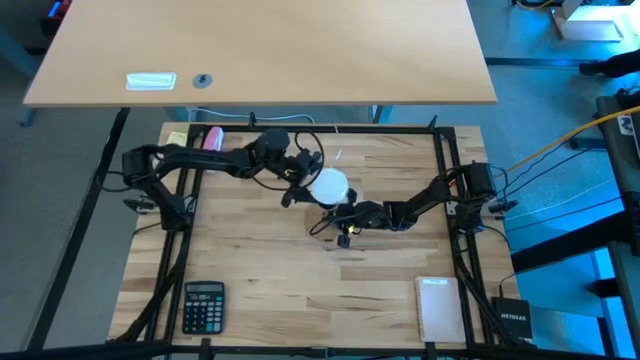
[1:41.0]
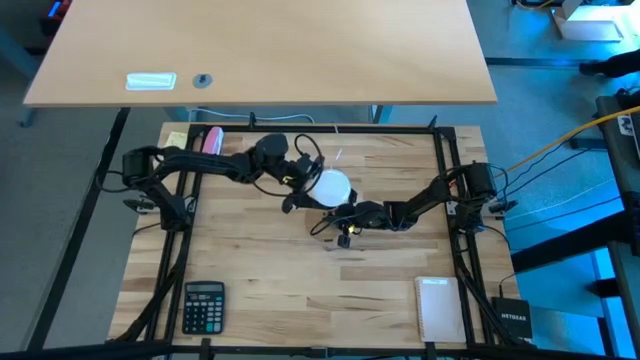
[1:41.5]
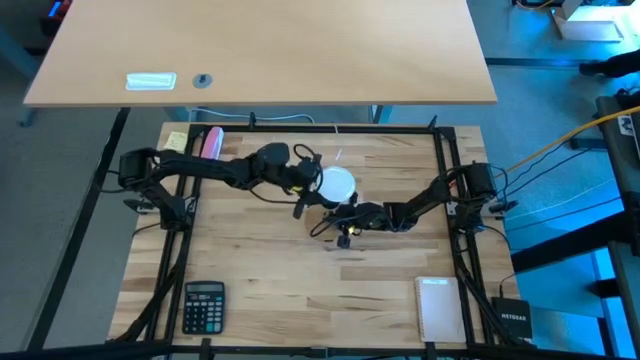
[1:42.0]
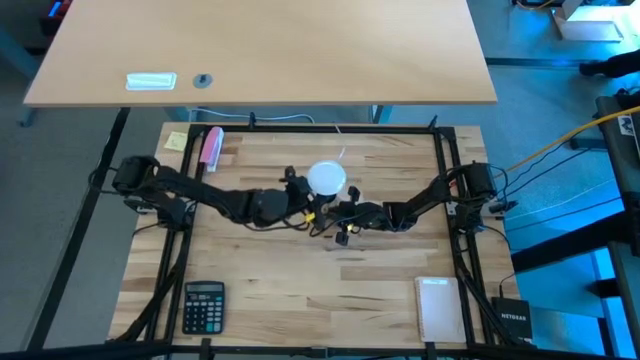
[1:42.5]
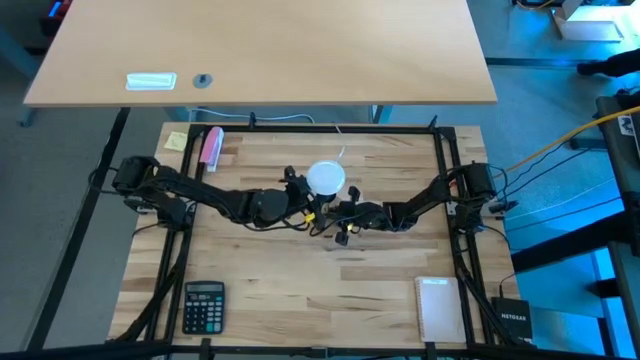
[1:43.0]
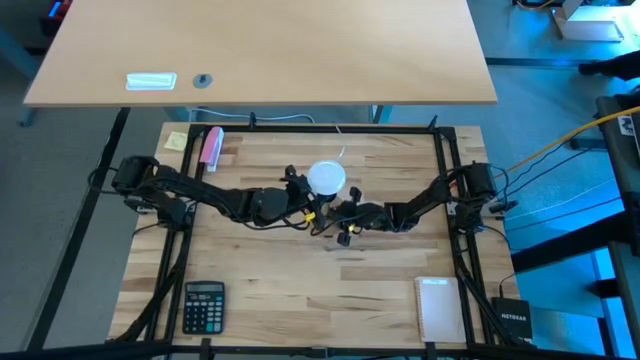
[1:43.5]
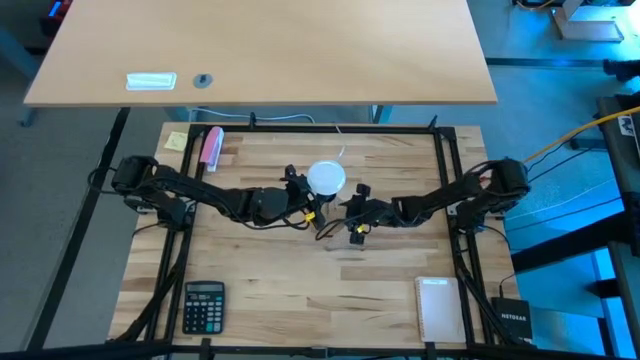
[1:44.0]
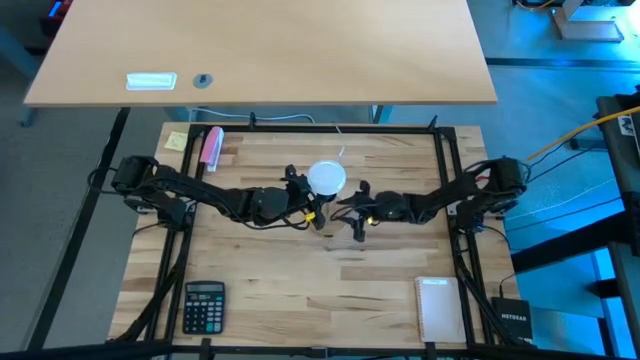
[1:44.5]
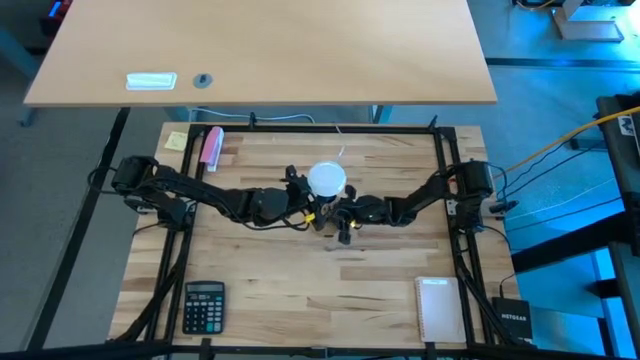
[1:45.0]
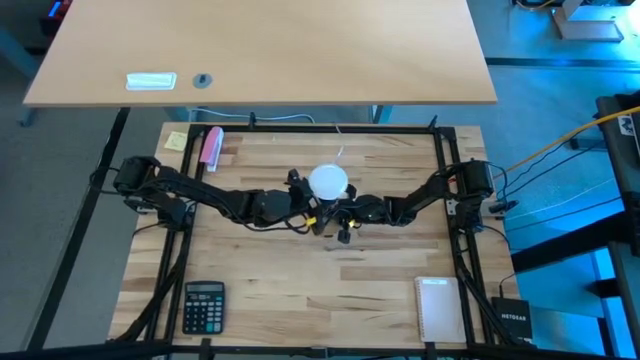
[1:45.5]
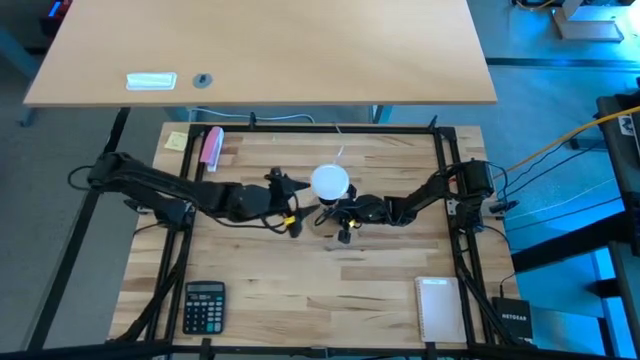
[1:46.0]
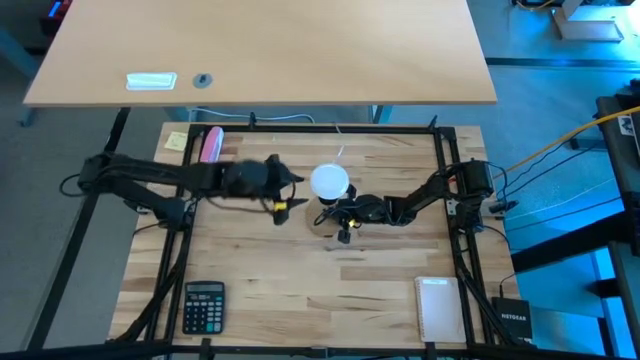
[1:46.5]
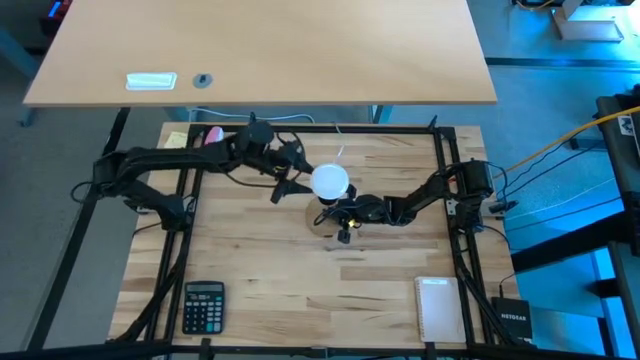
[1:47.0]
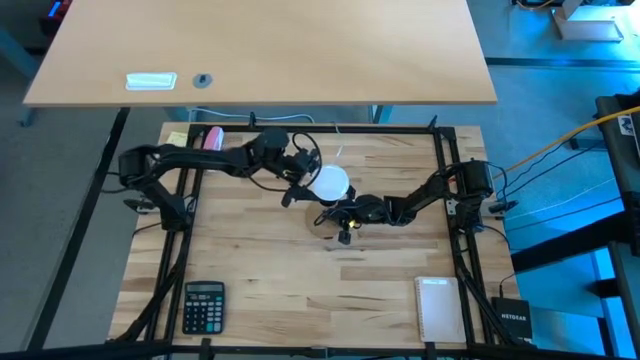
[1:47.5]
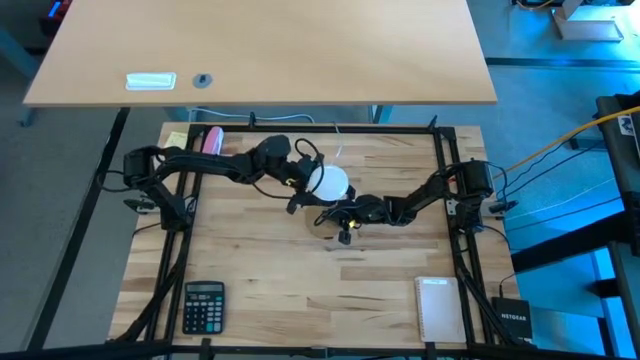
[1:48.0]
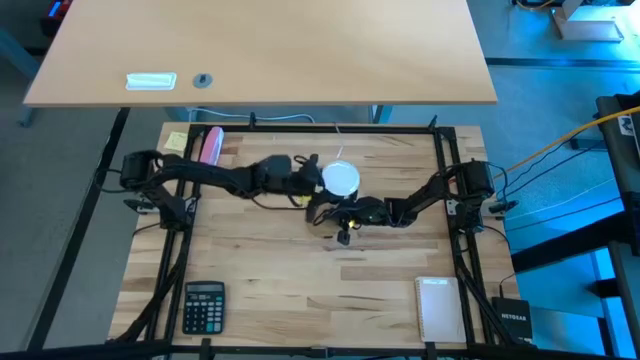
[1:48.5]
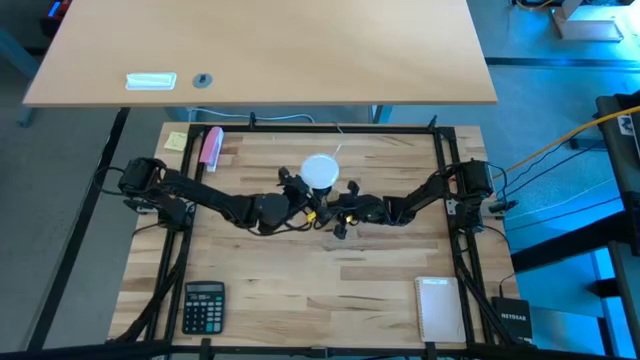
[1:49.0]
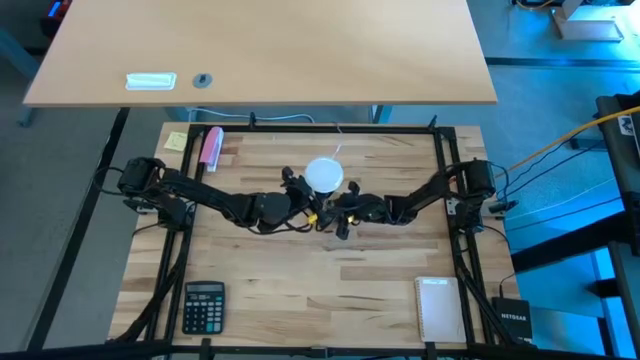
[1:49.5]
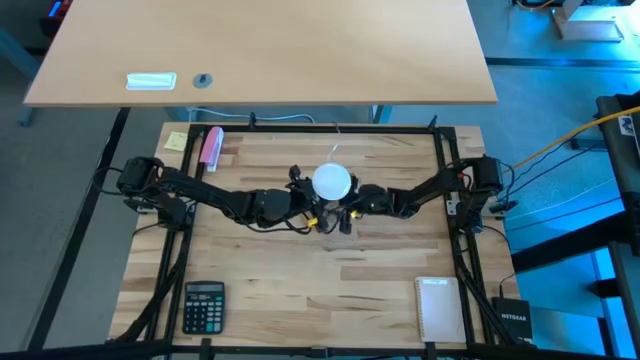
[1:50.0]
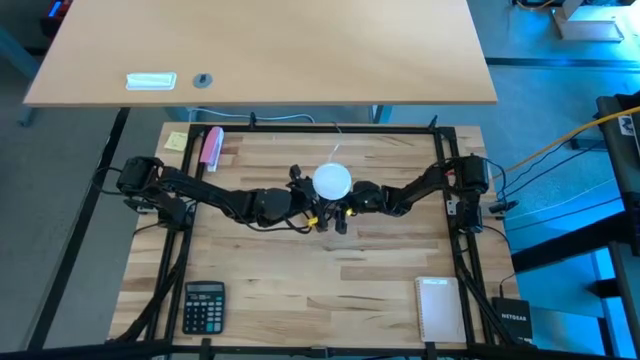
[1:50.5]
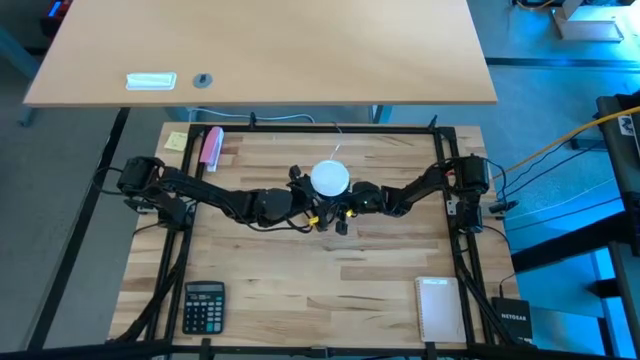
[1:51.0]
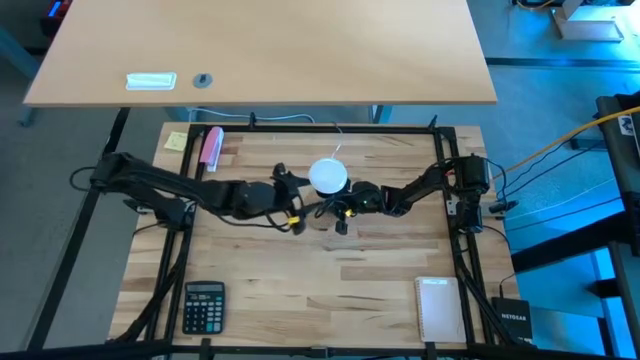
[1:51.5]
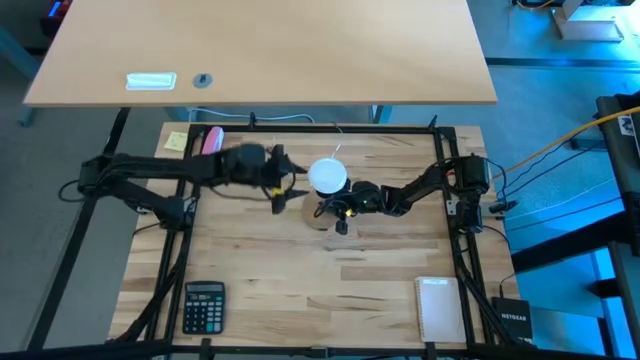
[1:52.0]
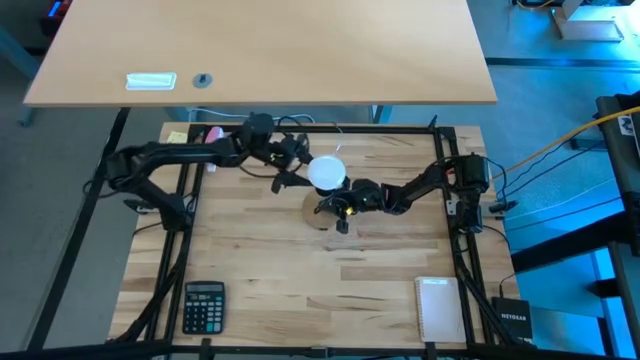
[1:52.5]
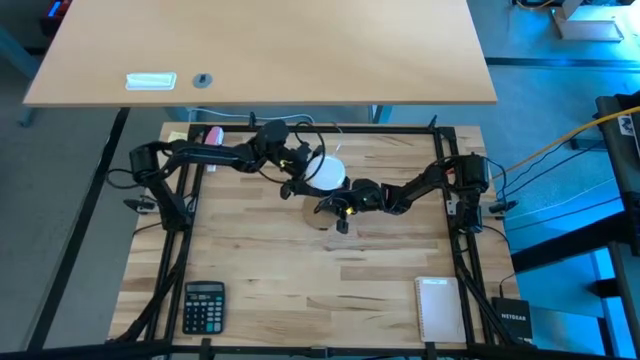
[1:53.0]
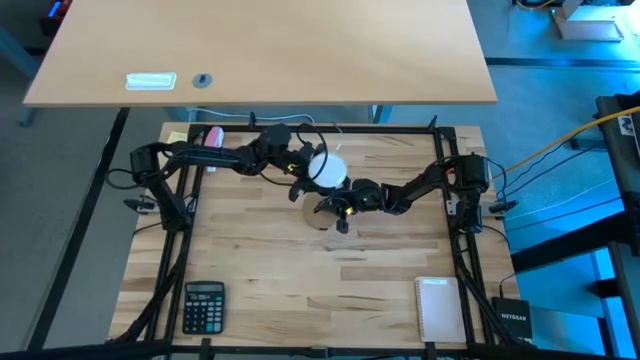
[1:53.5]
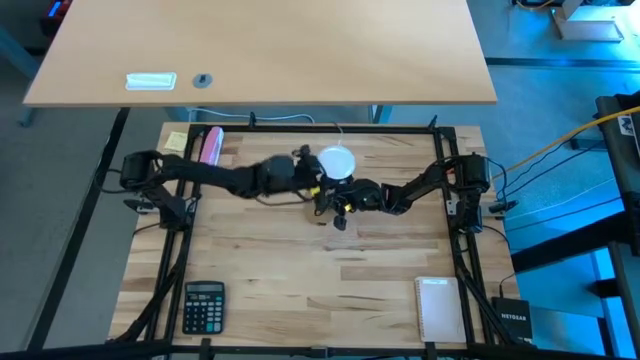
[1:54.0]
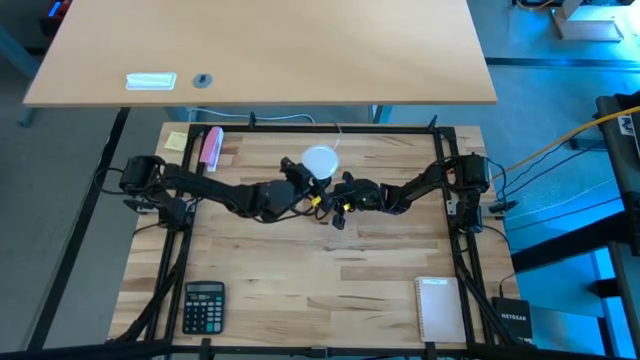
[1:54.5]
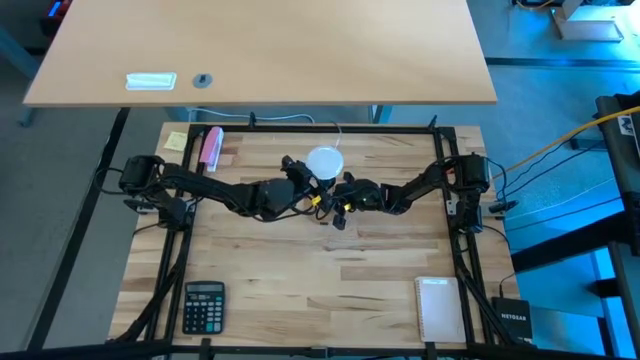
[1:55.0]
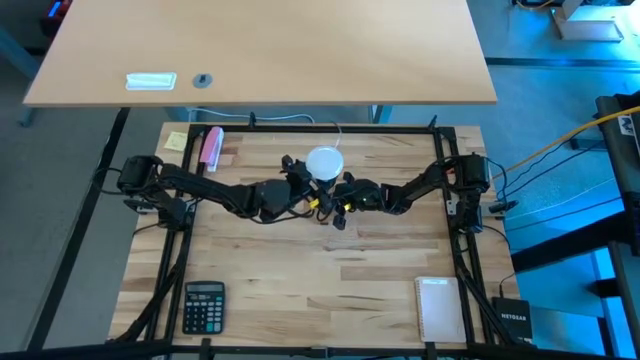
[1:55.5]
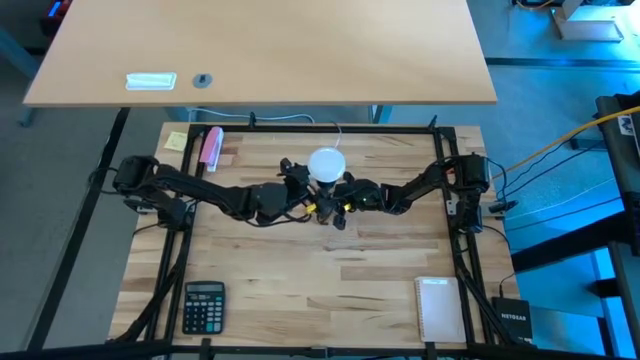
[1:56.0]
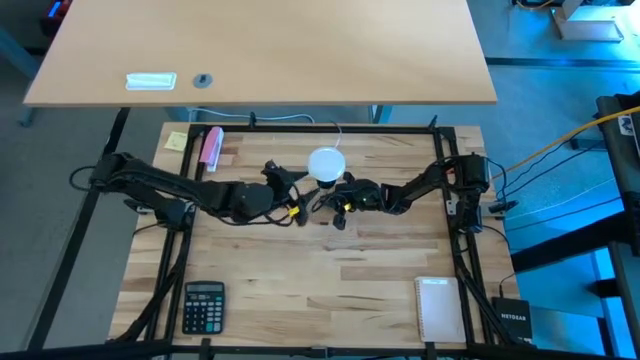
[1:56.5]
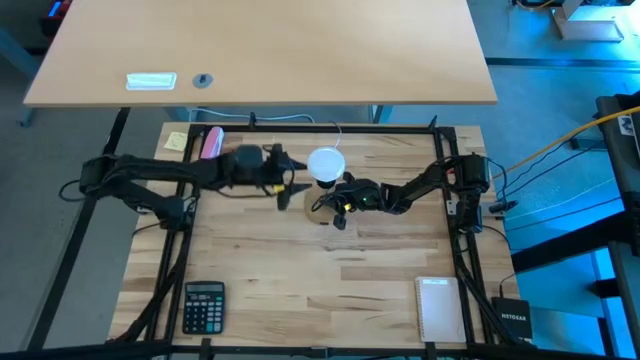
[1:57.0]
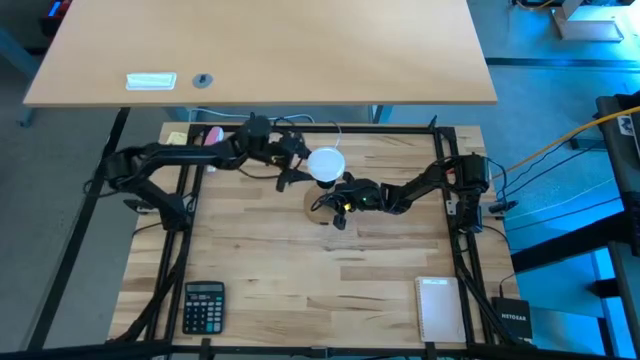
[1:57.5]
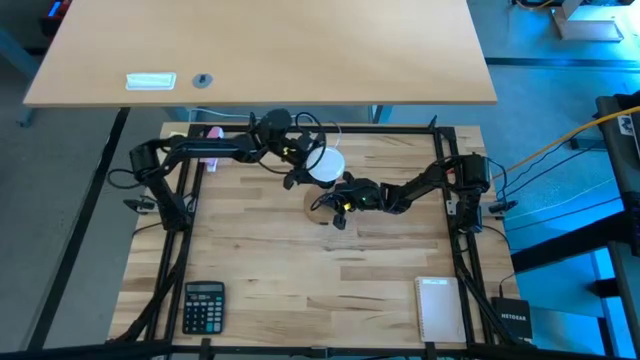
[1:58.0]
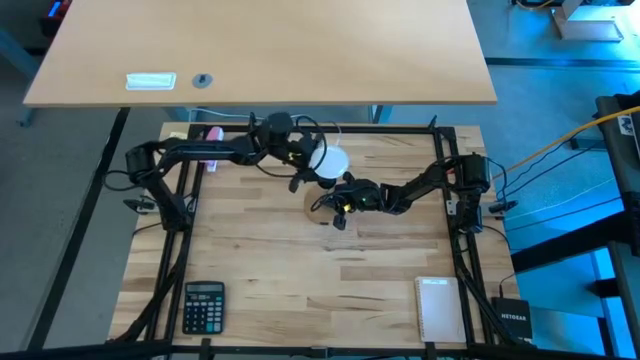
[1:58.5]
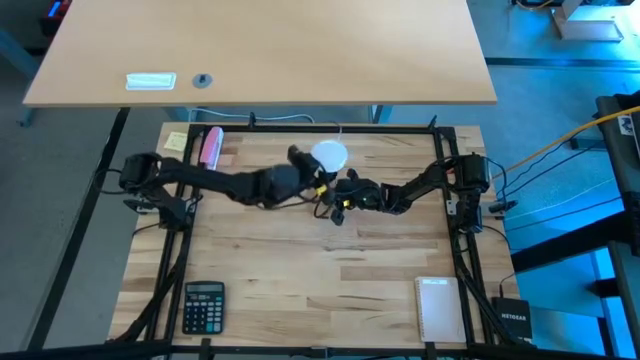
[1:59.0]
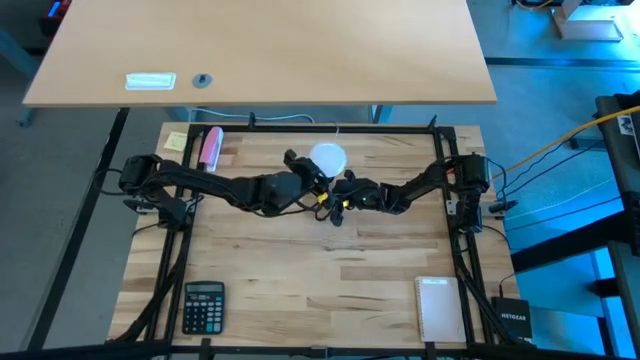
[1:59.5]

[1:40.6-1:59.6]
Task: Screw lightbulb
Remove the white lightbulb from the lamp

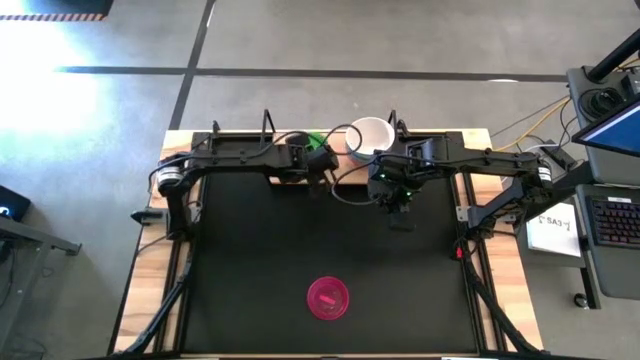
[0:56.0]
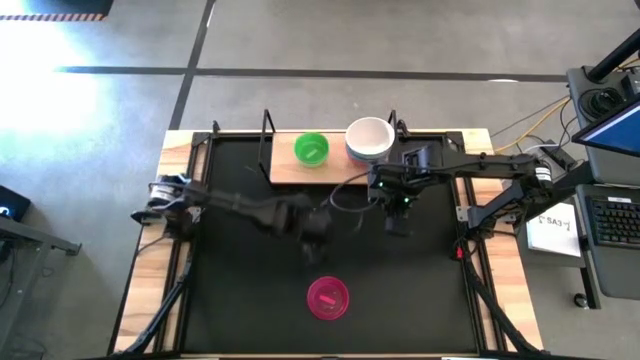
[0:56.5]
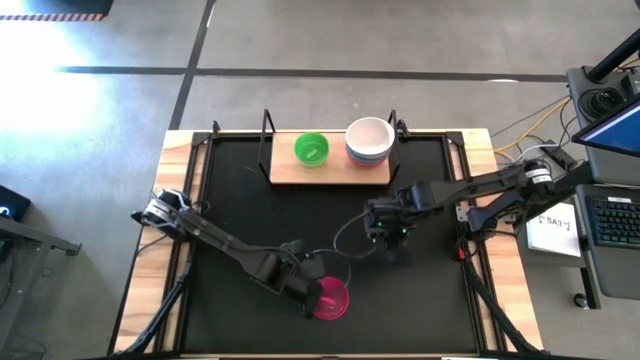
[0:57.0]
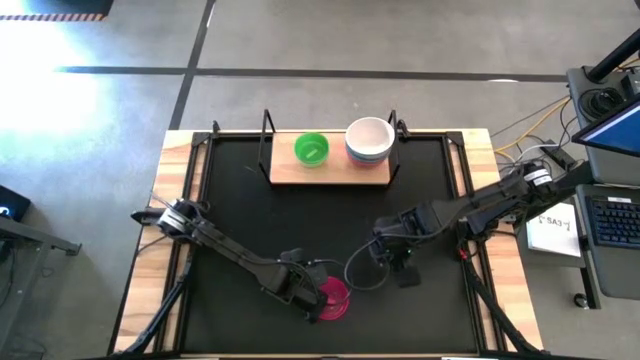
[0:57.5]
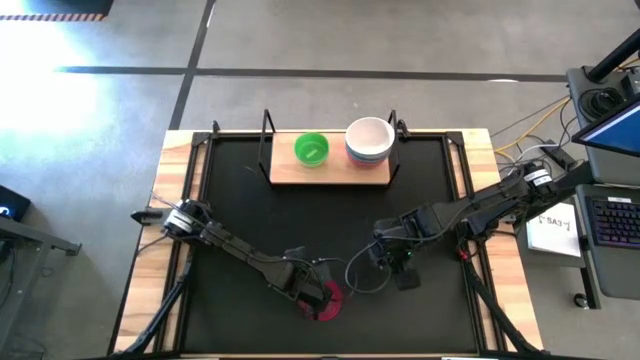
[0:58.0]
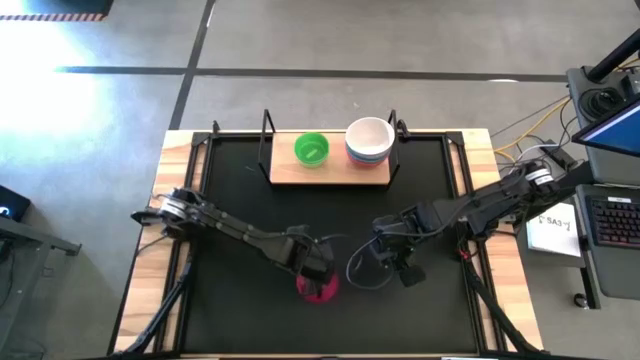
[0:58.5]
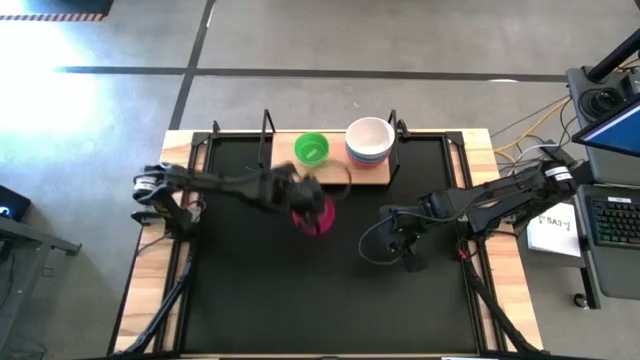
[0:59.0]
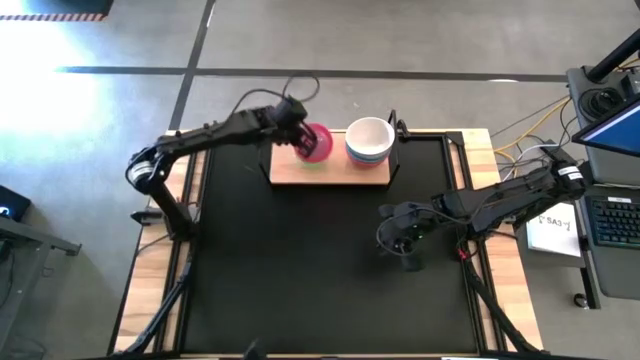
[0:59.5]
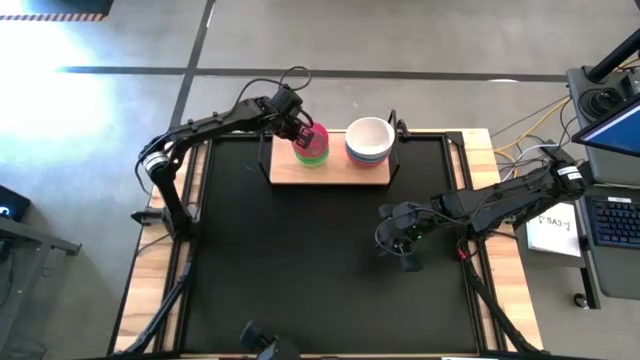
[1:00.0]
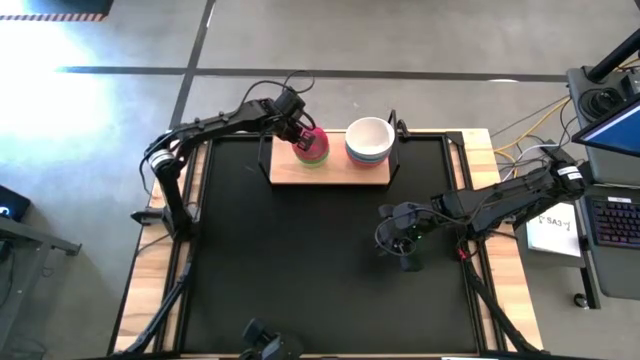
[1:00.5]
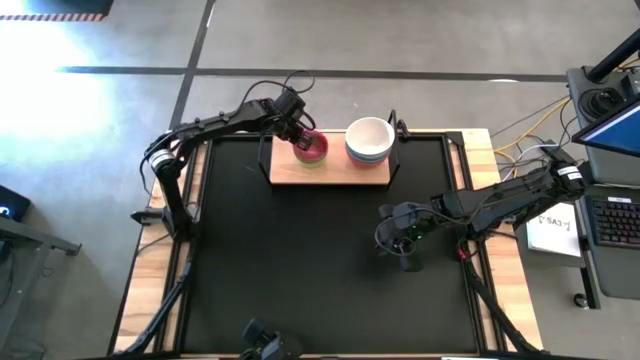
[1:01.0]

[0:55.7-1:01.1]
Task: Place and stack bowls onto a shelf
Stack the transparent red bowl on top of the transparent green bowl
